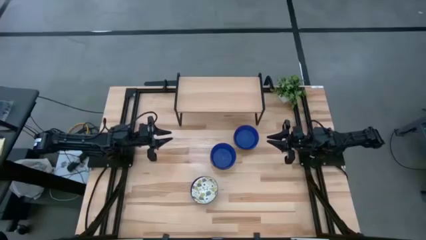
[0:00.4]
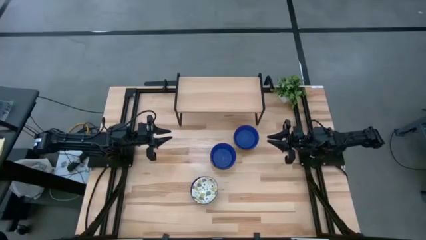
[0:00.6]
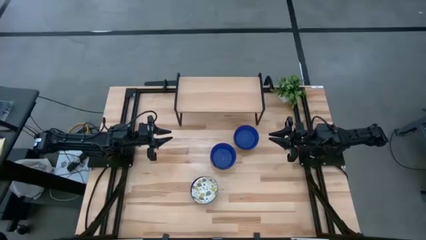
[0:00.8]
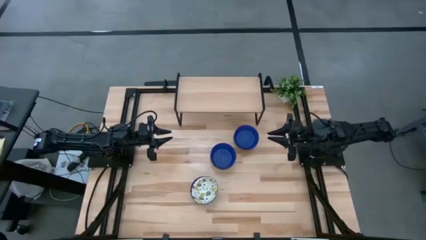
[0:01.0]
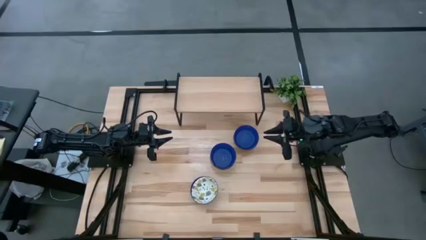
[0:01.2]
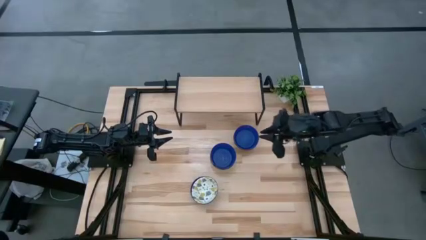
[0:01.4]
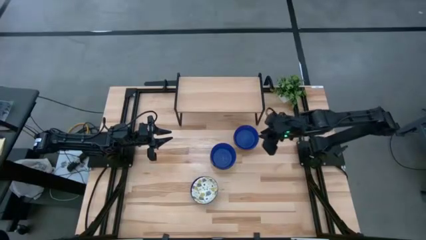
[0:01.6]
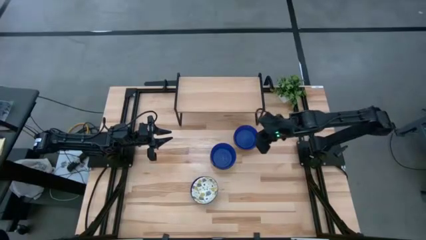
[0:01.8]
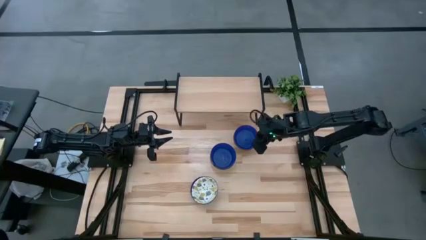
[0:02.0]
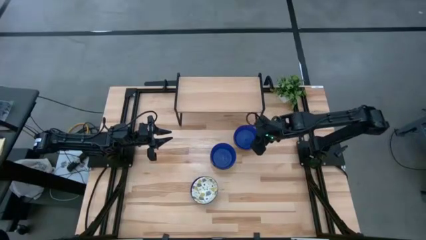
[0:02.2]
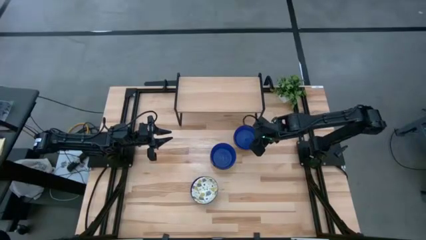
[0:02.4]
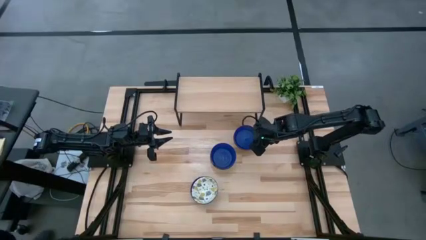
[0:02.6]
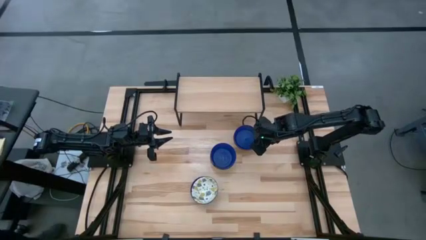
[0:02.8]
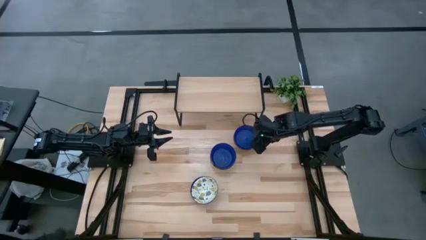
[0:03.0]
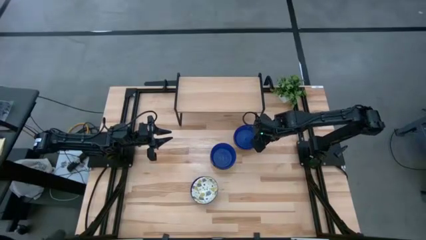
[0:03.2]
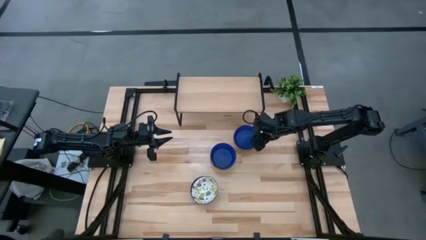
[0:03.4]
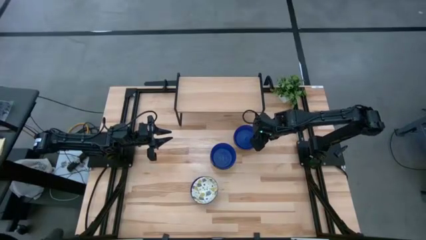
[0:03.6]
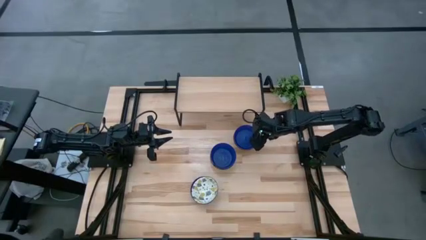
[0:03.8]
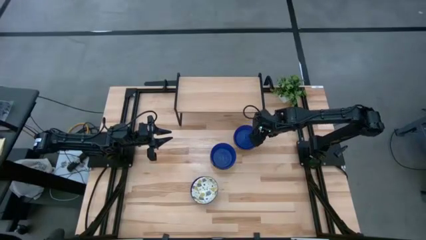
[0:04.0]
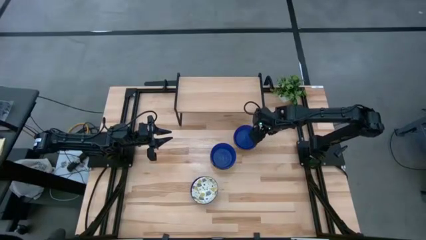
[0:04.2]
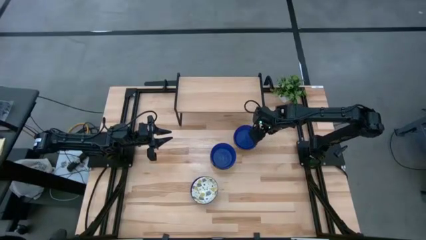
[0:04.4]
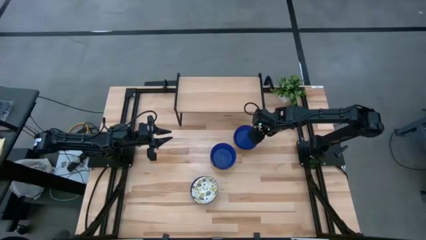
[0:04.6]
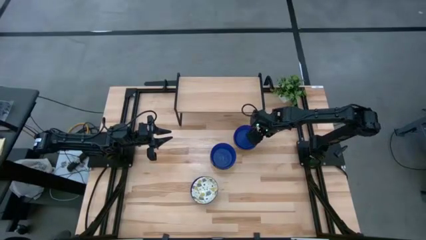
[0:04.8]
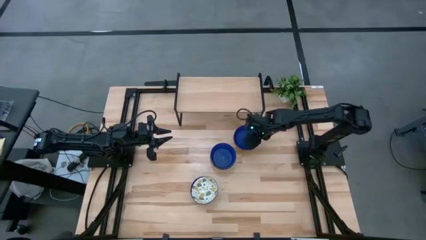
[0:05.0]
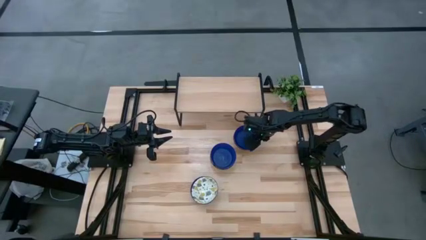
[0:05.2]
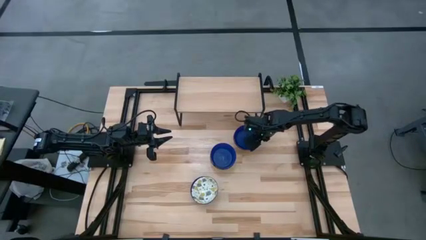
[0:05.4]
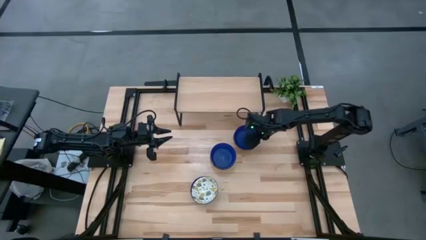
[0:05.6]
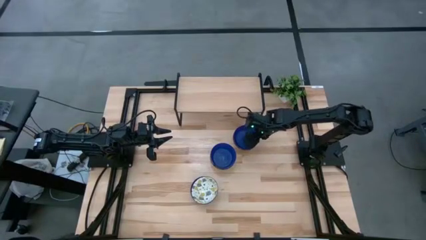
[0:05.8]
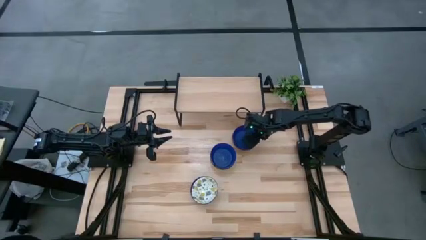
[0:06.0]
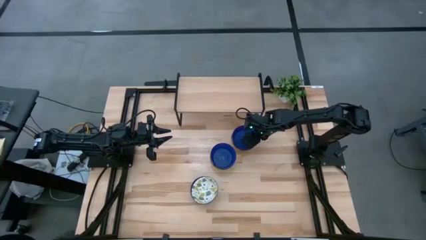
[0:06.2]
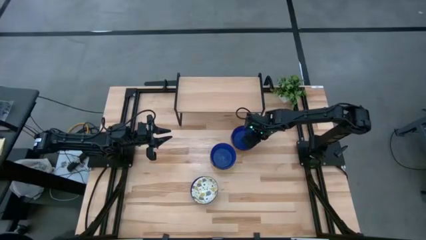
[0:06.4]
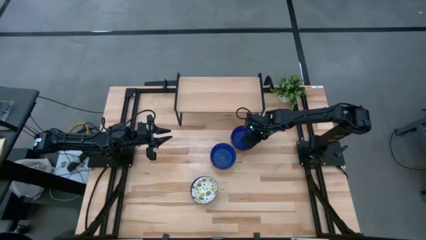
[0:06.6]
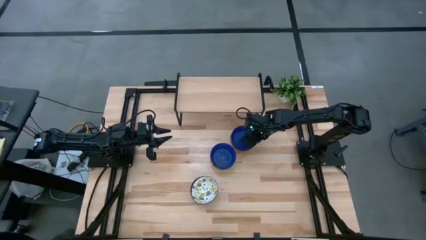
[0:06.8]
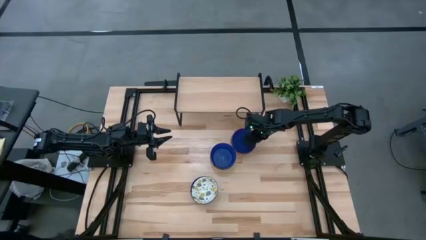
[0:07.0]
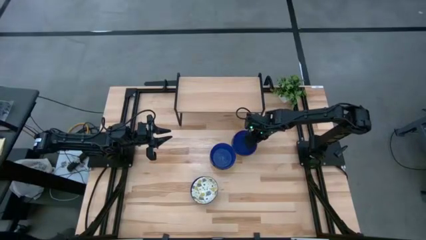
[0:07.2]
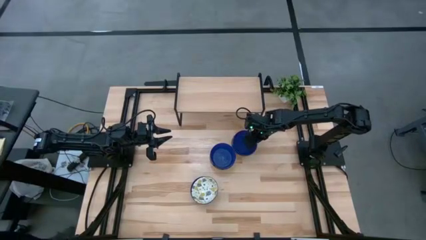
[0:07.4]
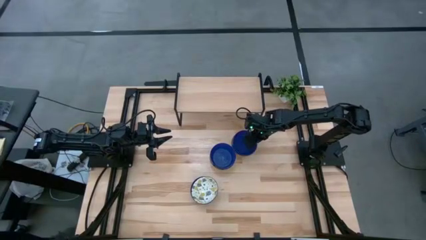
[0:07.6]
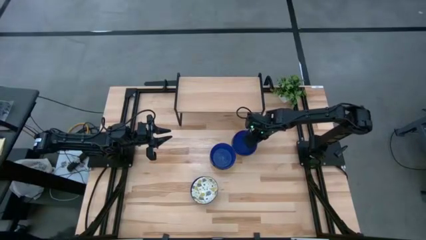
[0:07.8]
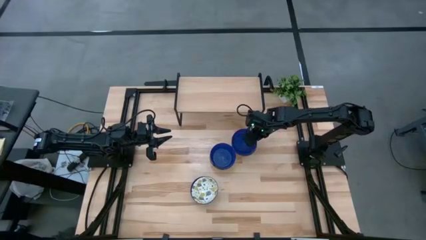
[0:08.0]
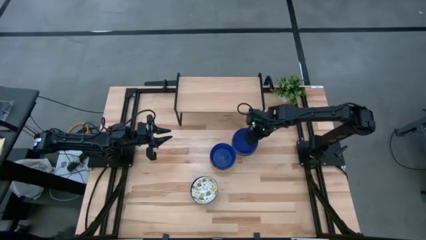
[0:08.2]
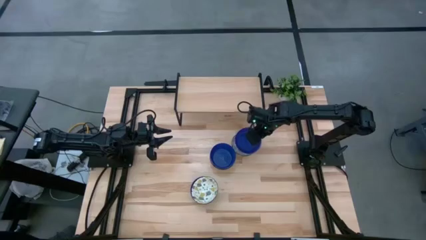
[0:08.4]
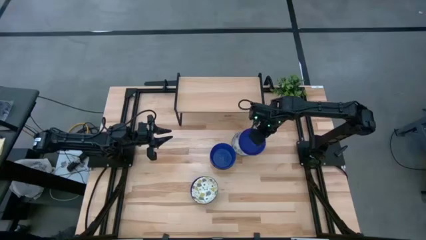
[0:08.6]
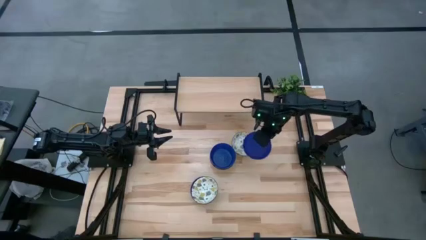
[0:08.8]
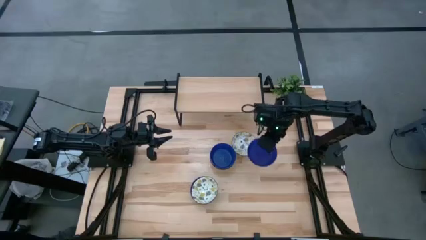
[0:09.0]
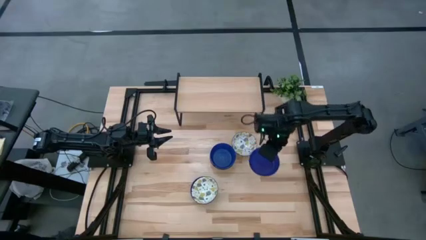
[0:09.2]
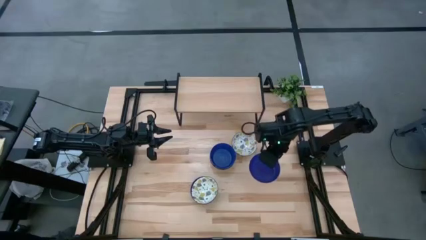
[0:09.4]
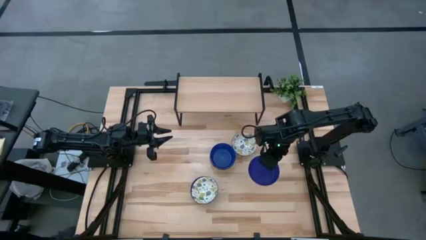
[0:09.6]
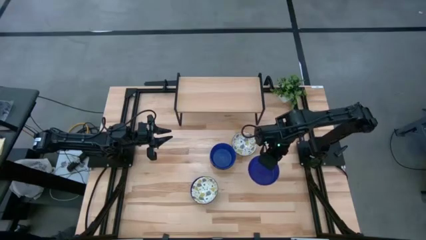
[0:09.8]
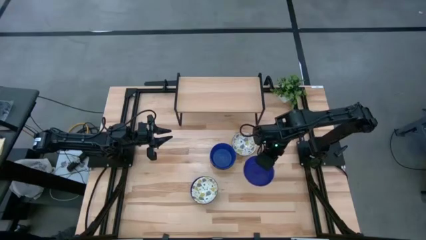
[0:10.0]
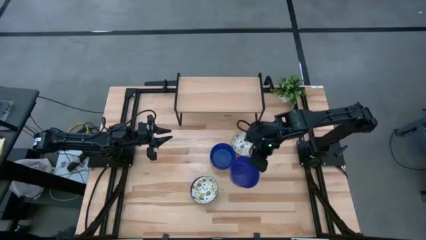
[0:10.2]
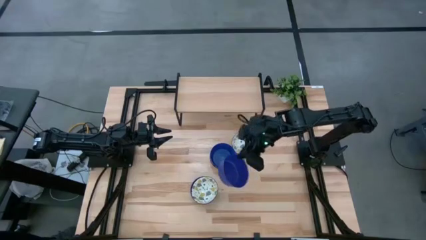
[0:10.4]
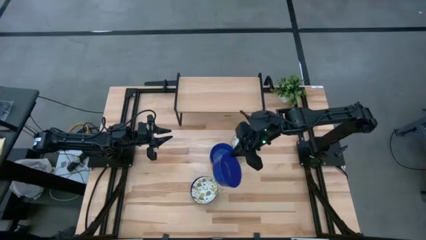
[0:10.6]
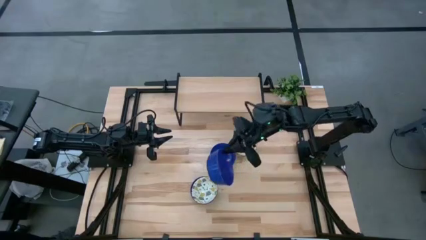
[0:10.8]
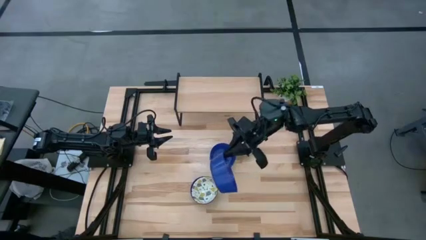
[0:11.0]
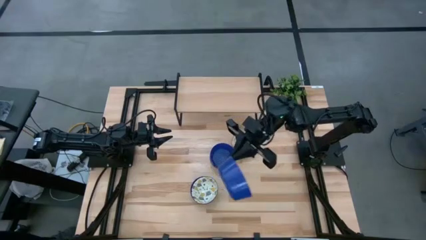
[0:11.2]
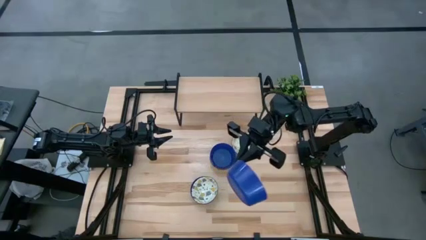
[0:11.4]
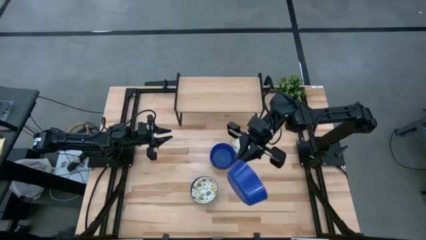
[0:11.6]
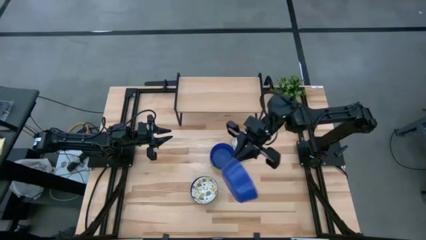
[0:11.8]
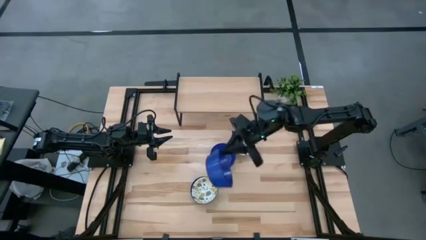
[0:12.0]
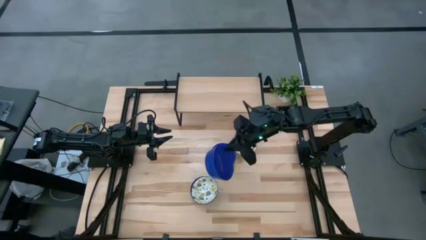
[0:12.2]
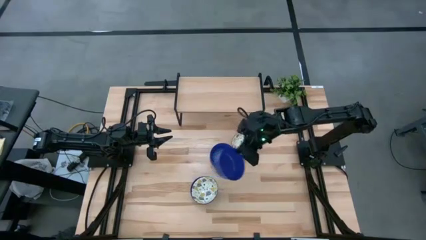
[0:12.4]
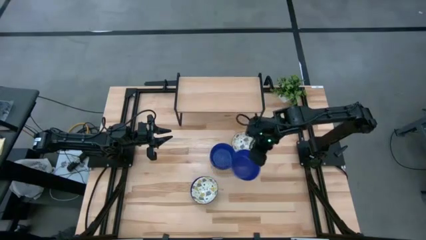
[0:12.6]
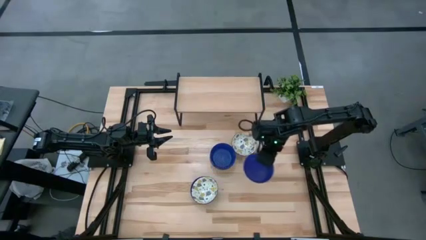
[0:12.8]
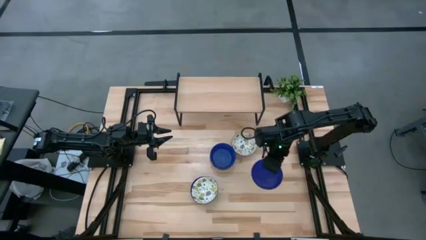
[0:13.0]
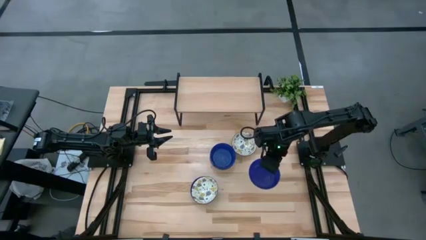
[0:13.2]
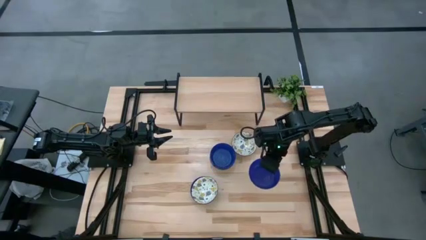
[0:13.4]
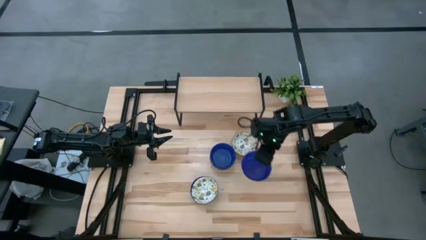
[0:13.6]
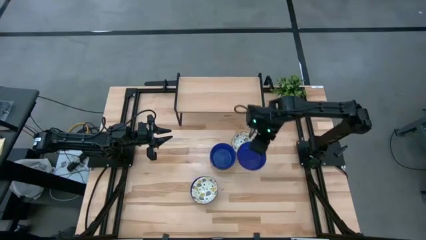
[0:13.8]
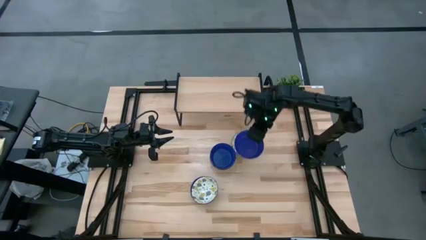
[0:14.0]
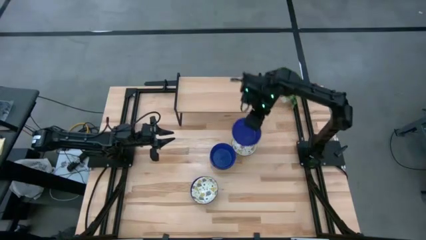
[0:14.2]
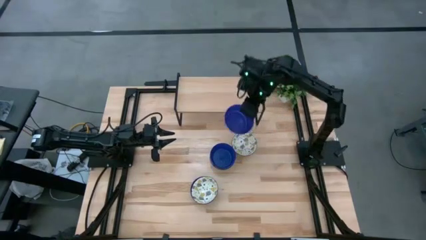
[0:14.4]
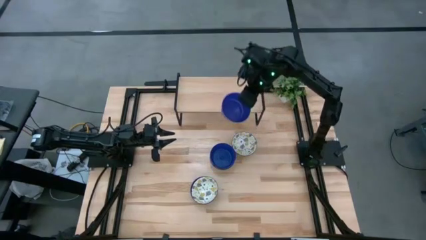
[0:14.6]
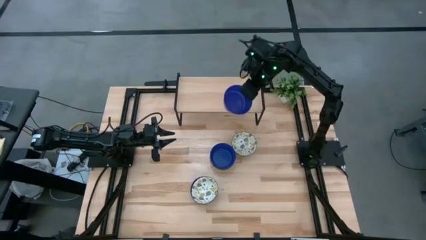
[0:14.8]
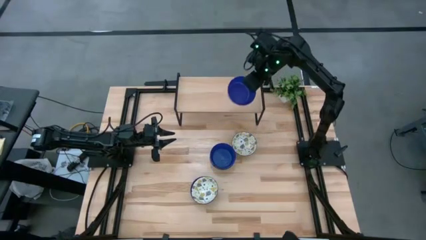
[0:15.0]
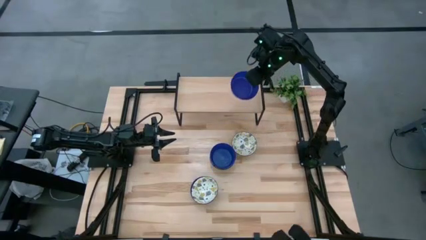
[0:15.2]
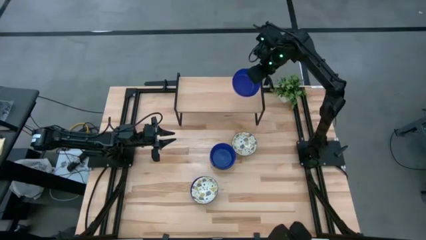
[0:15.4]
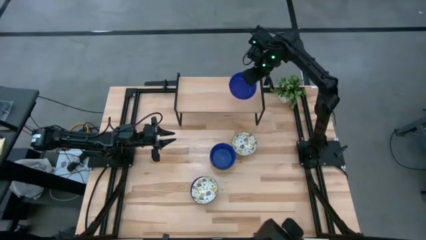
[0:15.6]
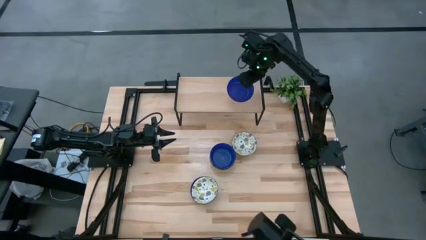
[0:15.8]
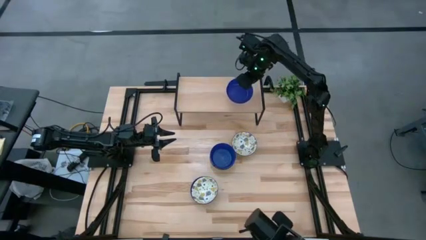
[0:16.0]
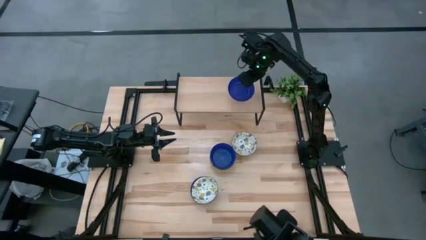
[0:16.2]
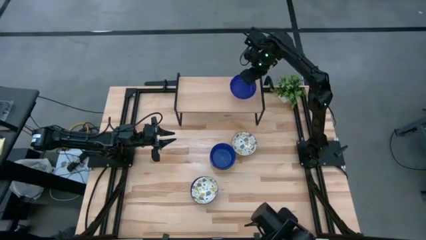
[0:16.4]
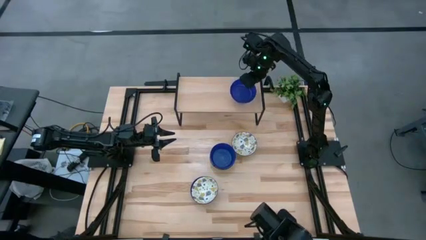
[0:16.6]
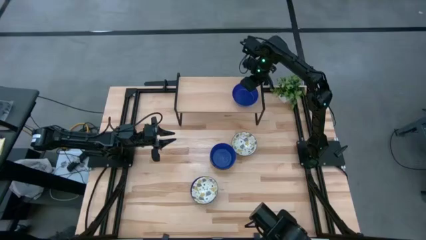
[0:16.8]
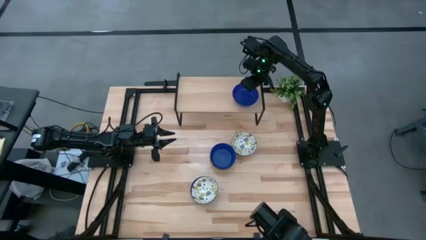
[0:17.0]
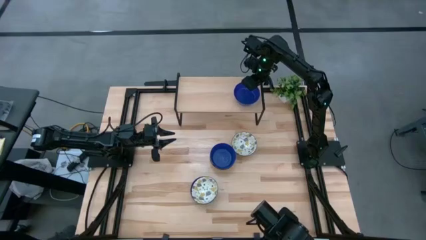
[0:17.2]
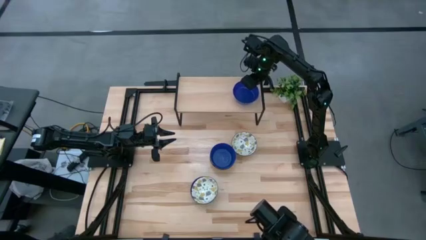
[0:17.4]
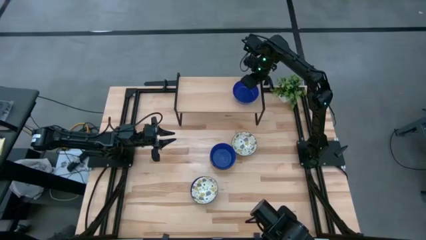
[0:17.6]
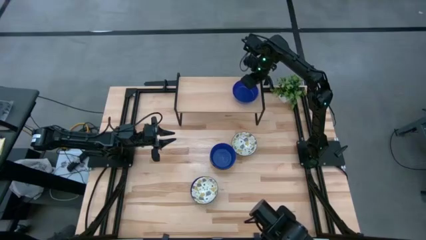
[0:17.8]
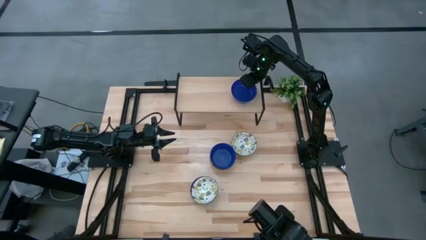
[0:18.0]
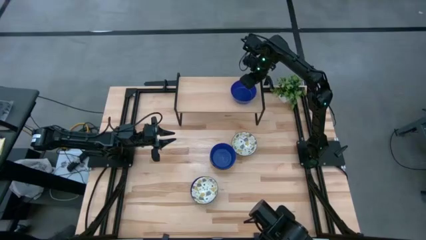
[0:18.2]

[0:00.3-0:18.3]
Task: Pick & Place Mini bowls
Put the top blue bowl on the shelf
